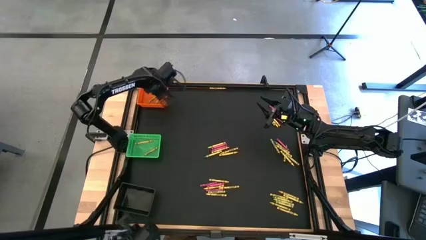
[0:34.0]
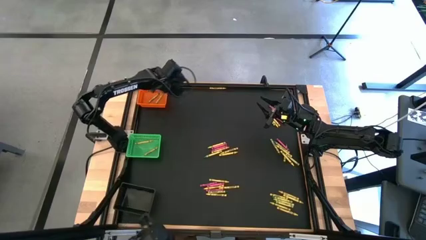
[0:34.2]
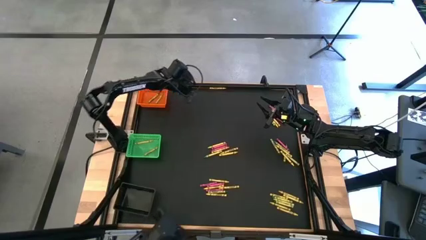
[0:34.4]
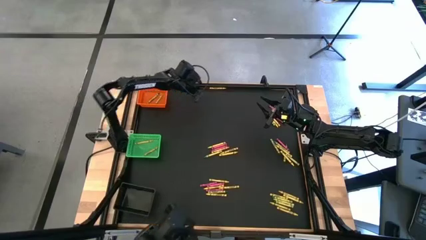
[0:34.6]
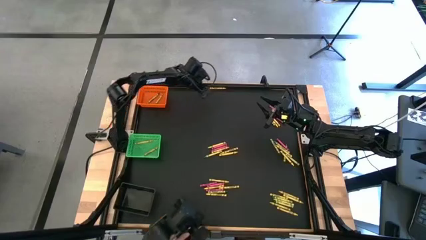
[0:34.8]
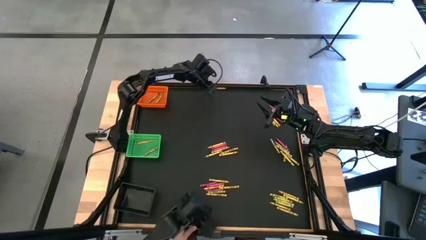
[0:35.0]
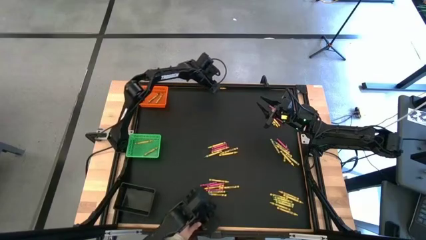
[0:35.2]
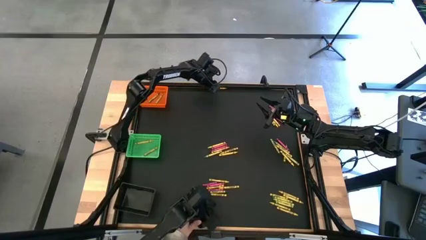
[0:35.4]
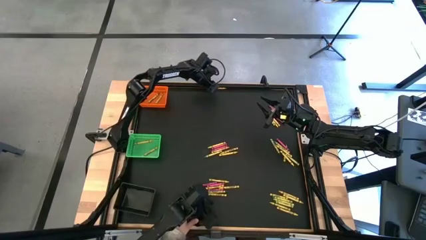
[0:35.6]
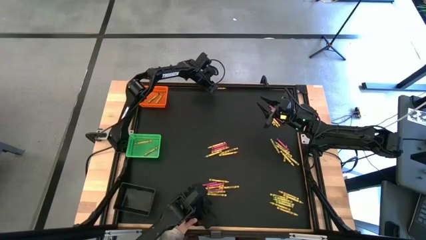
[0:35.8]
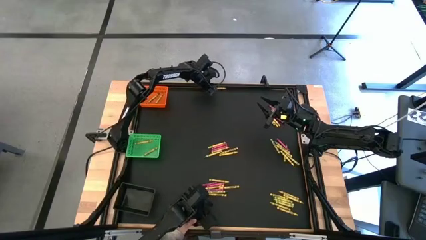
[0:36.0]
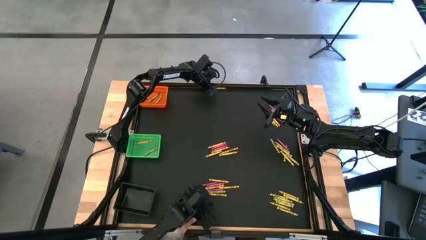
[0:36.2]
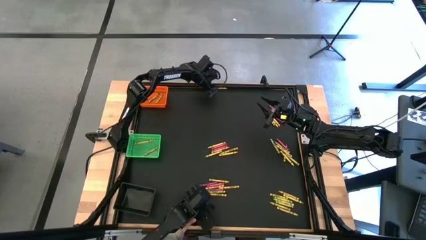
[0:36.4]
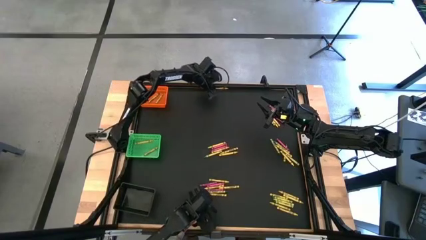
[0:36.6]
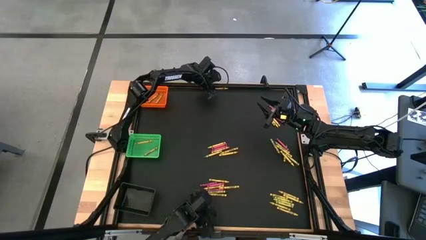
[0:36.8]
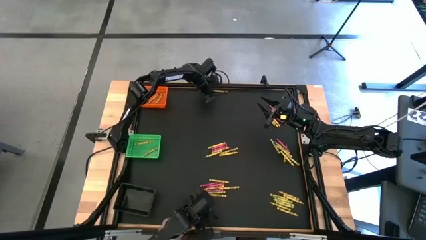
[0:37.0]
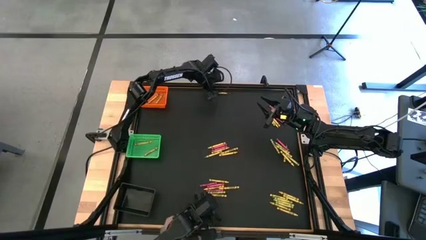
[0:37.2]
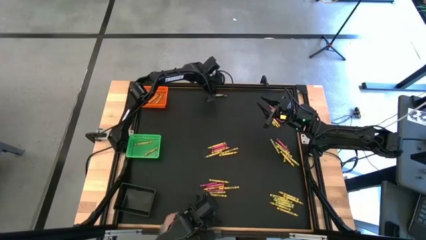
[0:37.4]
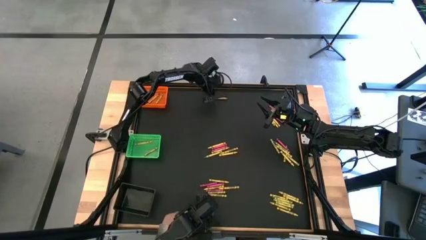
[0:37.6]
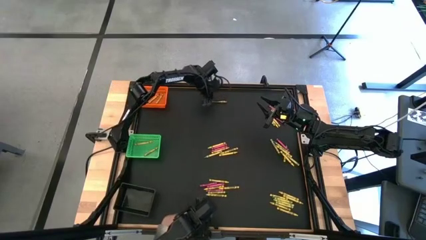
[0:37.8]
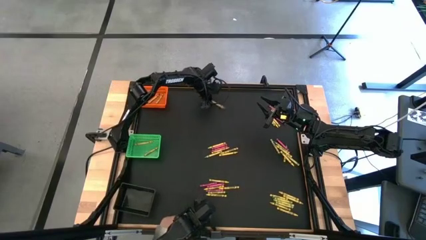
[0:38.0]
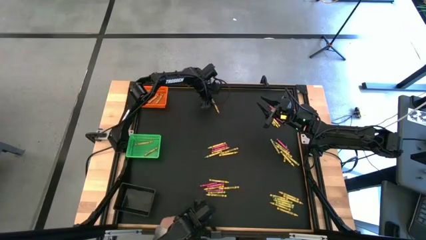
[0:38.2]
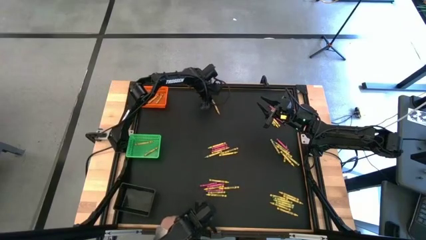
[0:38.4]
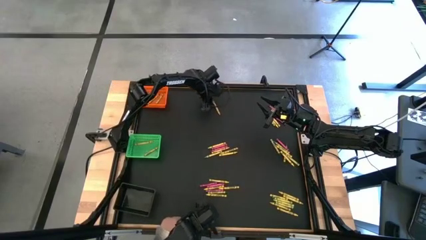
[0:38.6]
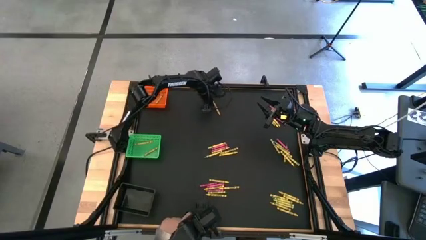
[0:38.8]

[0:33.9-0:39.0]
Task: Sort crayons
Put the yellow crayon into the green bin

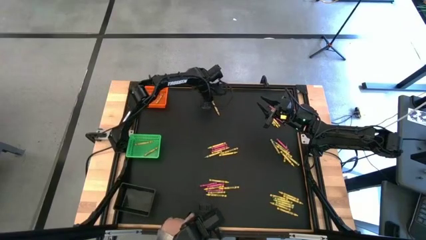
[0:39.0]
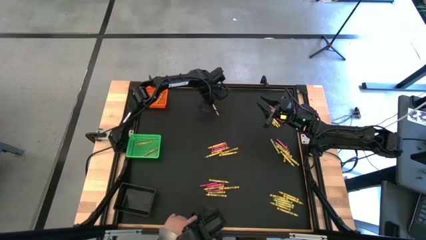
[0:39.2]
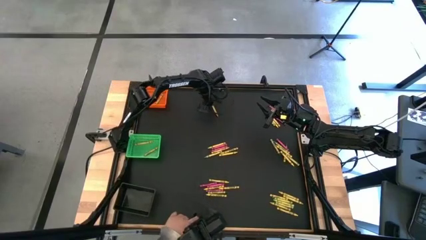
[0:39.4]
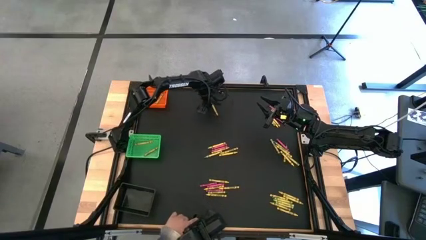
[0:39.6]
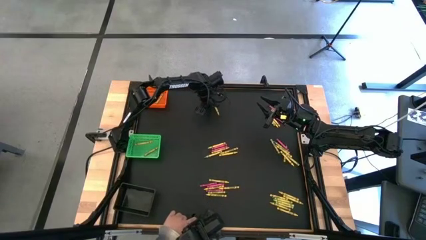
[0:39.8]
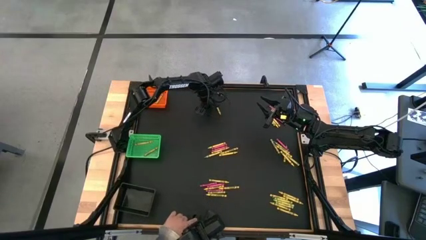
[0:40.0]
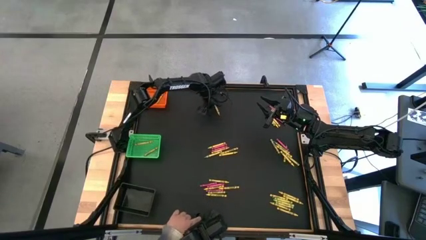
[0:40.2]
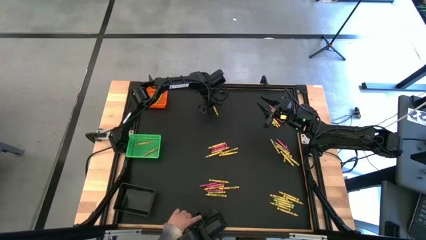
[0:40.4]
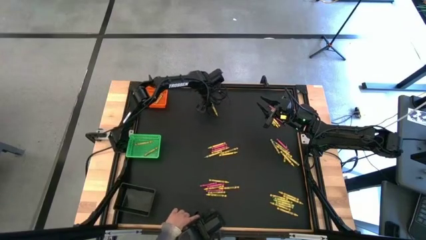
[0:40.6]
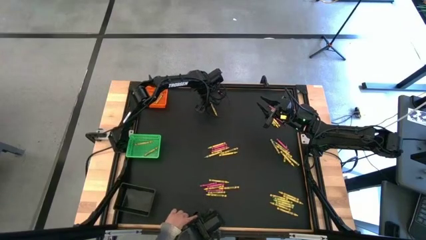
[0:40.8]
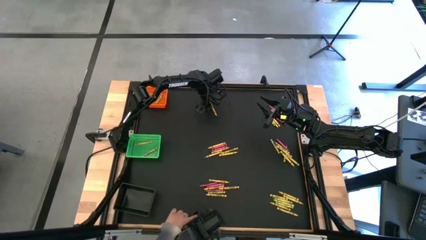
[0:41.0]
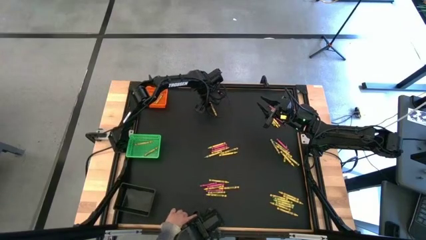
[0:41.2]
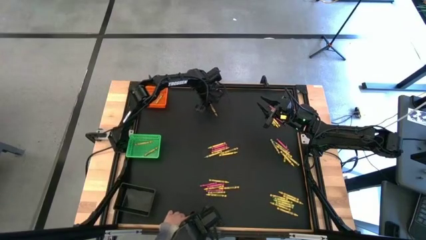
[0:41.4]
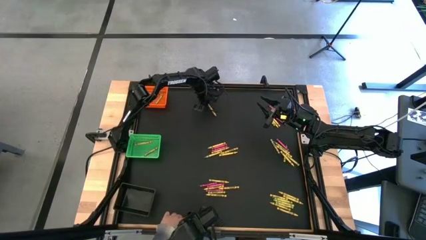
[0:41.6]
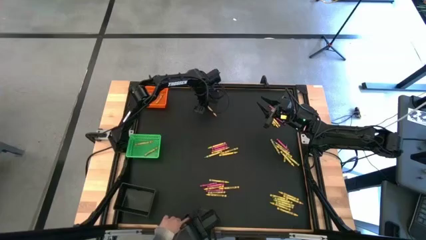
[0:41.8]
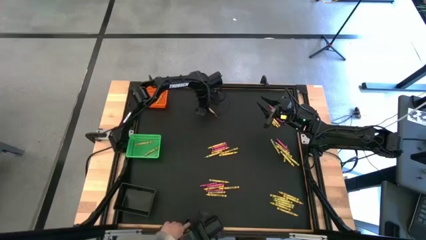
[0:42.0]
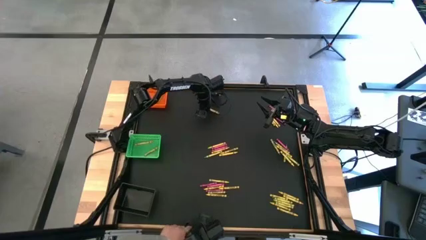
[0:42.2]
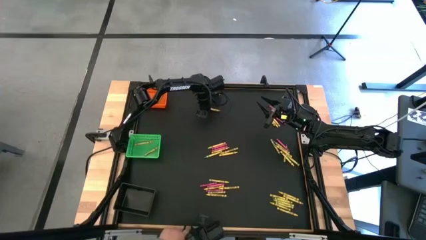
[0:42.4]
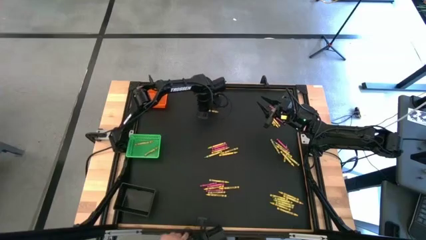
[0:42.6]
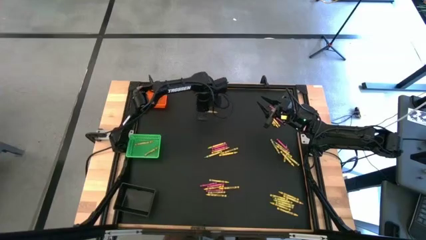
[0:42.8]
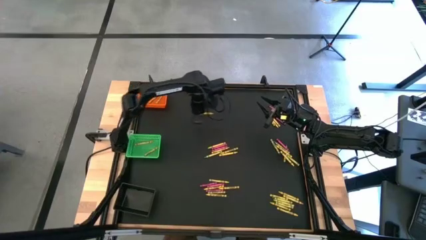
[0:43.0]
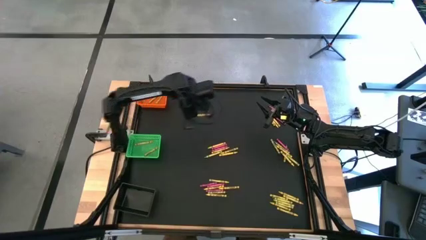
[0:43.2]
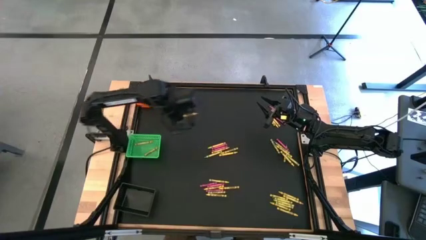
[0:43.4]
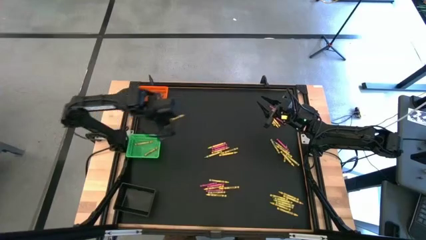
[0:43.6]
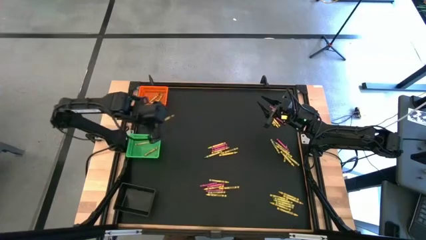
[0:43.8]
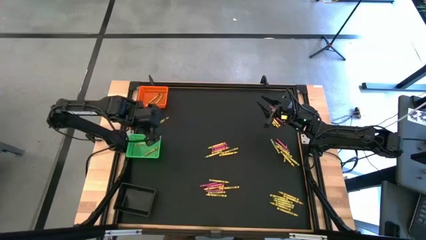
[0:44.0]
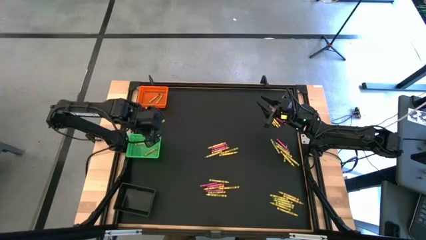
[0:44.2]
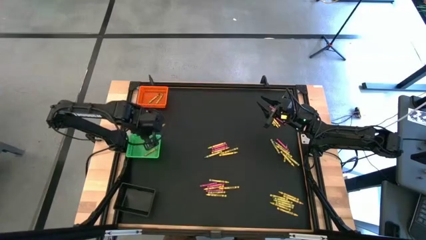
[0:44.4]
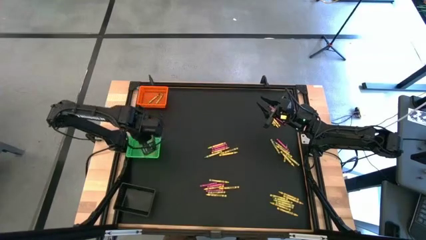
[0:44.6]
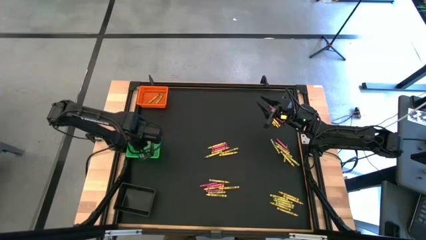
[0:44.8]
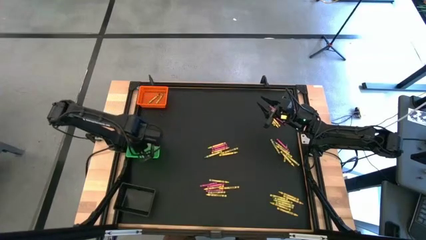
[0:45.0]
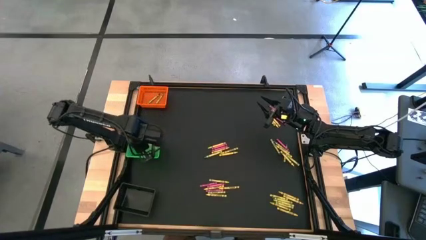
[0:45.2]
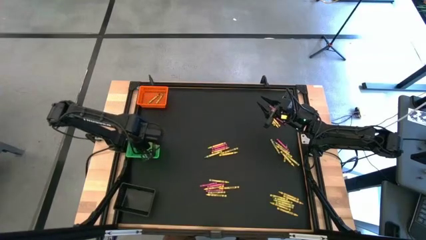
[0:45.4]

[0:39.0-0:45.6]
Put the yellow crayon into the green bin

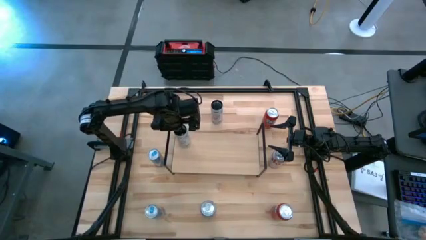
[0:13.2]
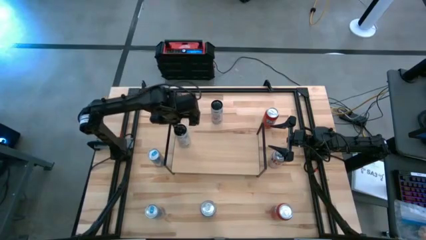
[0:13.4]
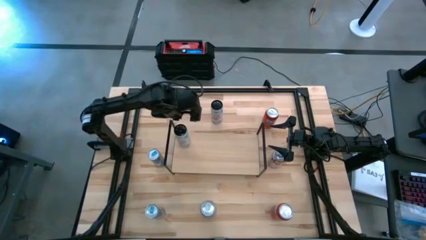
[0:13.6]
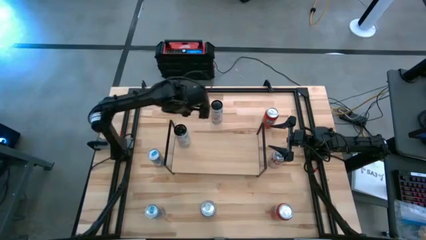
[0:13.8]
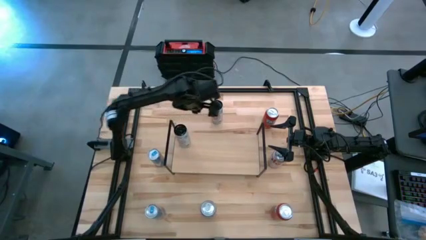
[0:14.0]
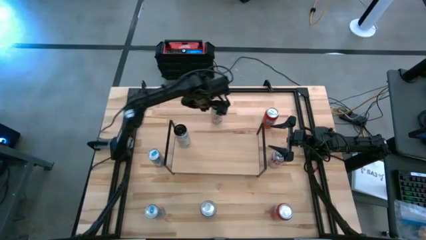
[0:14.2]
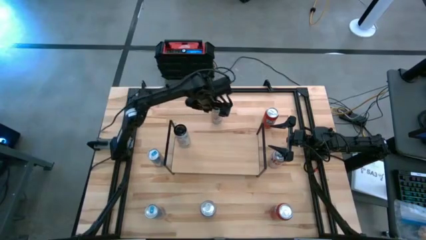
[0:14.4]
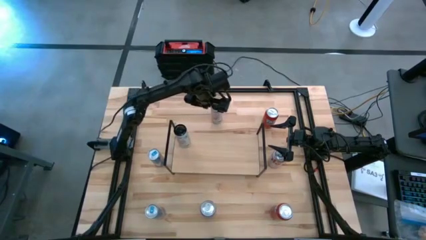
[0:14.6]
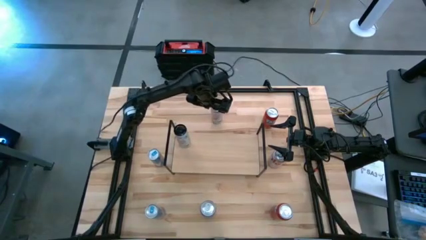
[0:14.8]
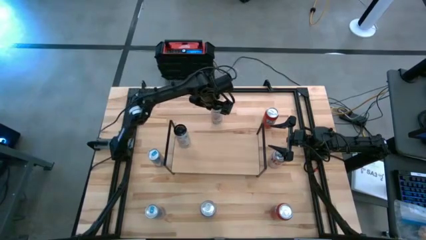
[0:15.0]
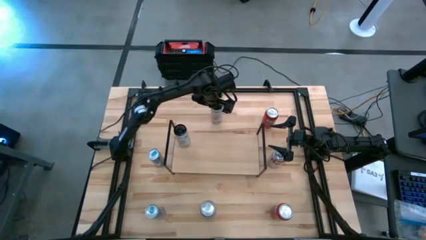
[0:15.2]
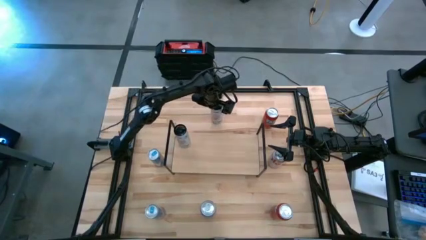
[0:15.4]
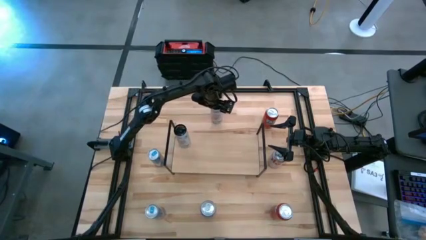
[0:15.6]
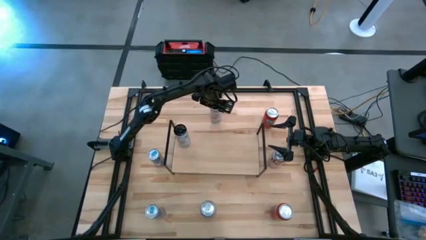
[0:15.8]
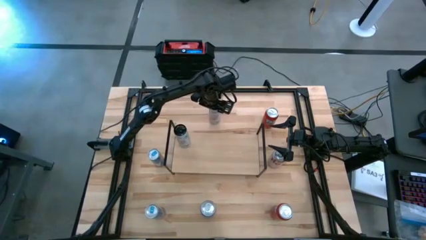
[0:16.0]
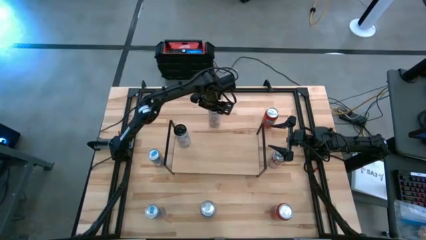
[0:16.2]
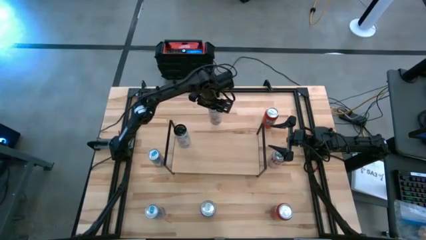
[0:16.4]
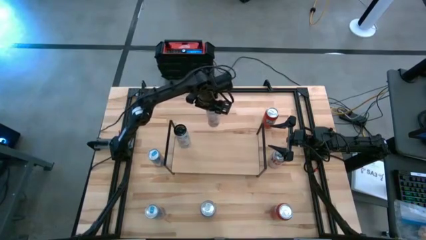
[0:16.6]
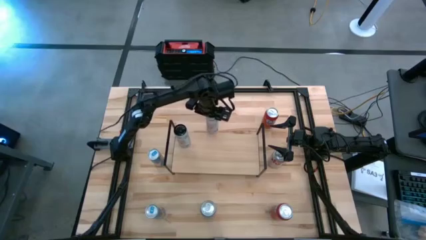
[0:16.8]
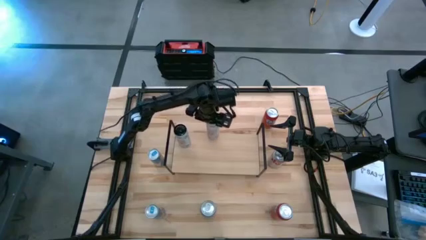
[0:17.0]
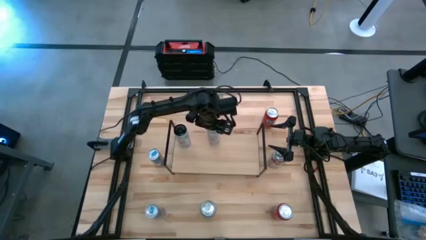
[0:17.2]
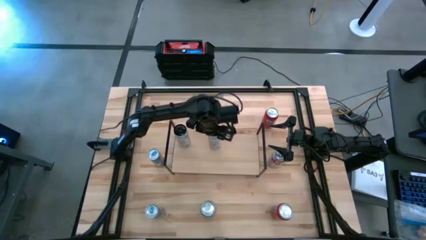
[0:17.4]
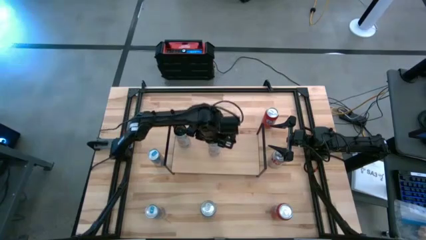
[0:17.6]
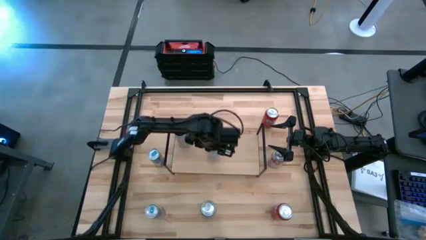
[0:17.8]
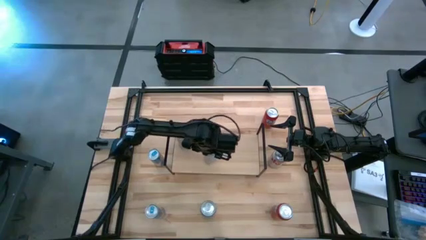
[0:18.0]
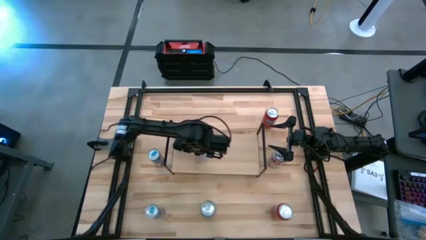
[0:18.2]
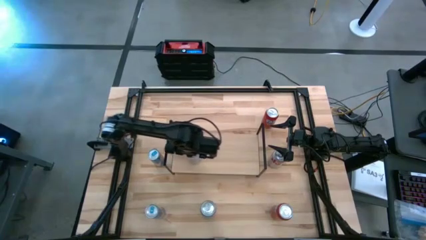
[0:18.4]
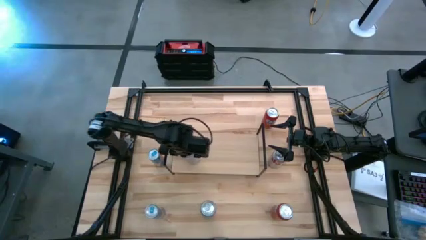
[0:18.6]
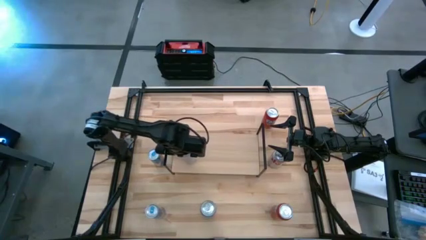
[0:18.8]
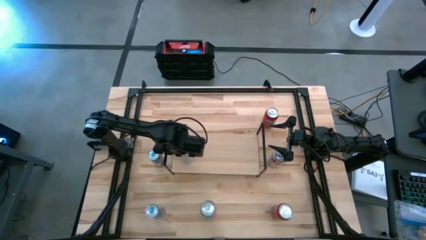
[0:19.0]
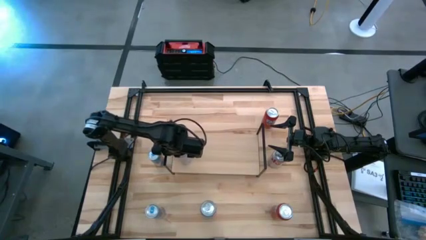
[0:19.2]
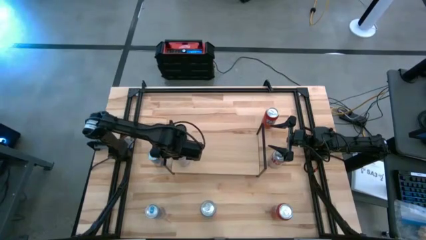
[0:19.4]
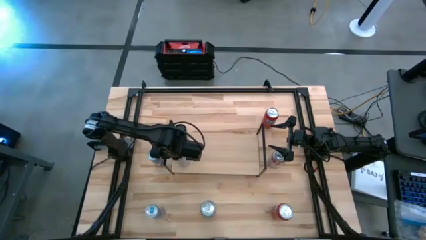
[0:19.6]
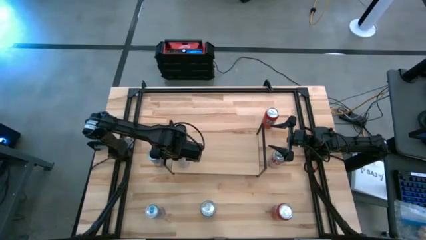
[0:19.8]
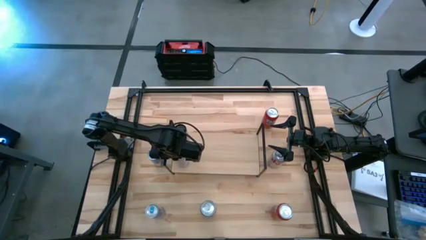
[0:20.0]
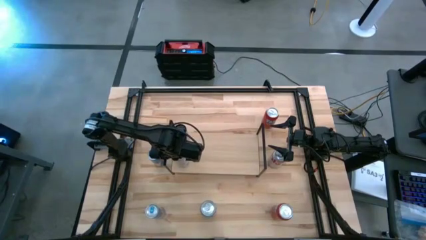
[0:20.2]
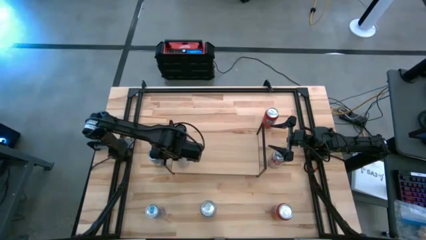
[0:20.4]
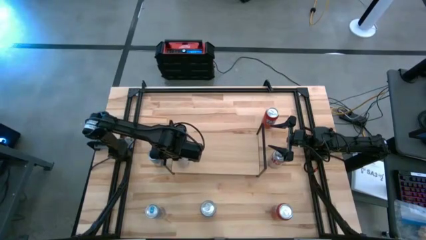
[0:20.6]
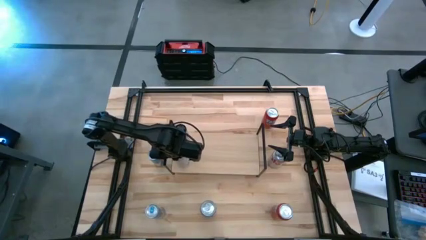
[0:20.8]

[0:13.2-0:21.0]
Task: Place canned beverage on shelf
Put the white-pink soda can on the shelf aligned with the white-pink soda can
